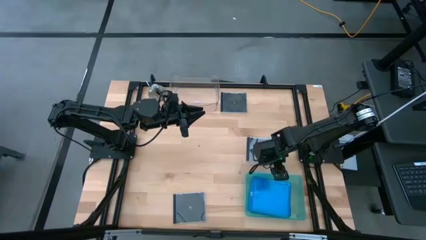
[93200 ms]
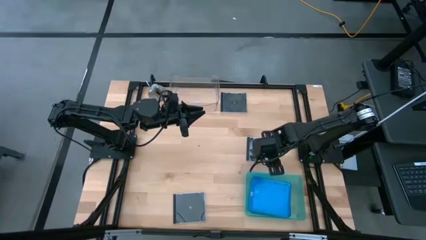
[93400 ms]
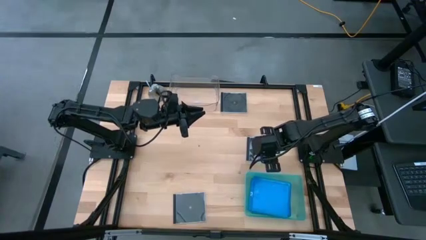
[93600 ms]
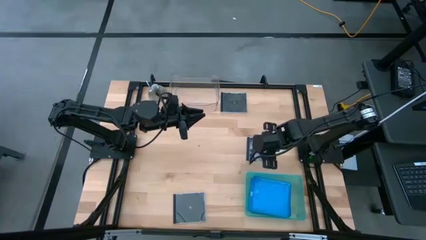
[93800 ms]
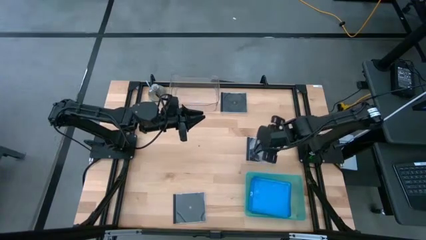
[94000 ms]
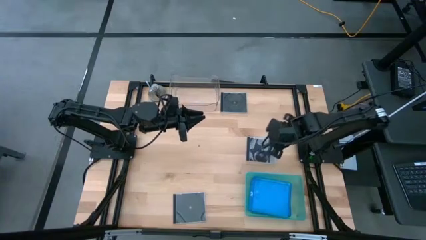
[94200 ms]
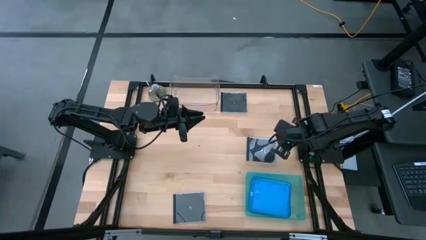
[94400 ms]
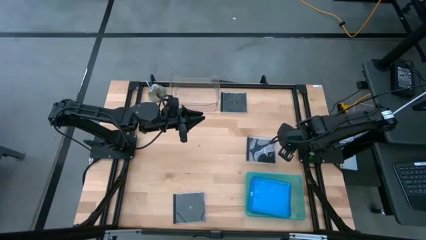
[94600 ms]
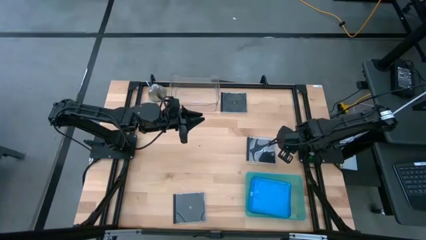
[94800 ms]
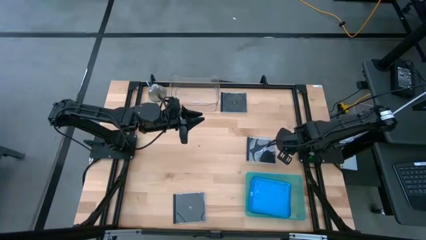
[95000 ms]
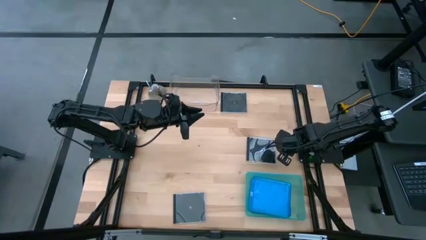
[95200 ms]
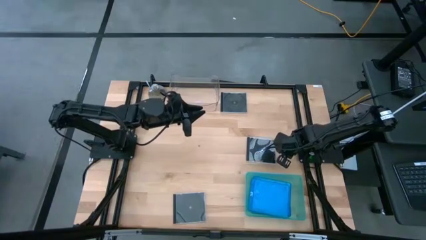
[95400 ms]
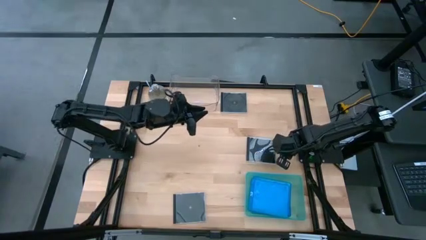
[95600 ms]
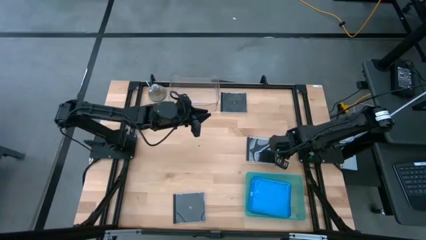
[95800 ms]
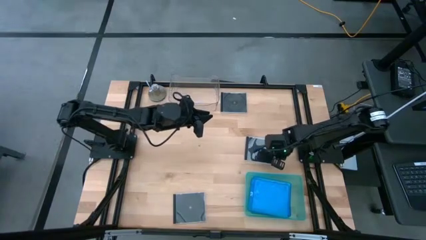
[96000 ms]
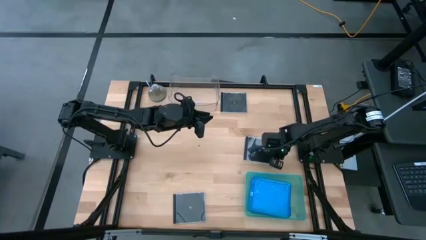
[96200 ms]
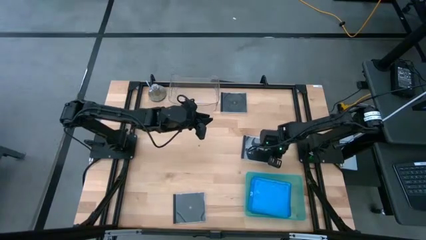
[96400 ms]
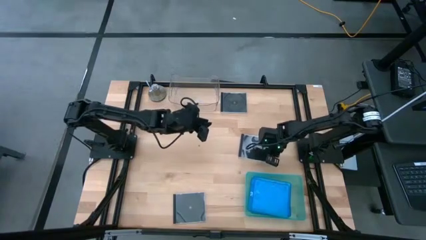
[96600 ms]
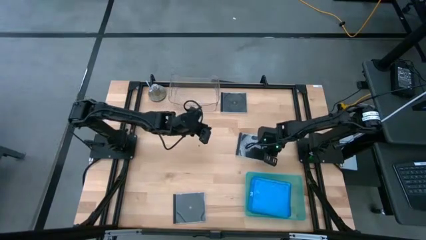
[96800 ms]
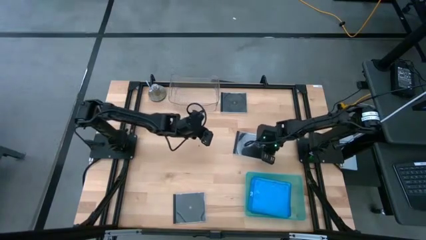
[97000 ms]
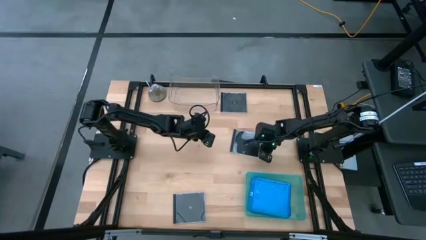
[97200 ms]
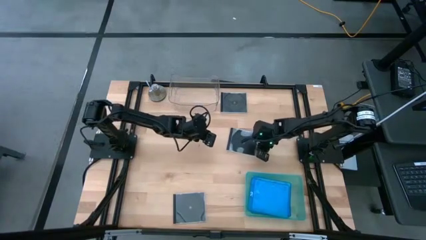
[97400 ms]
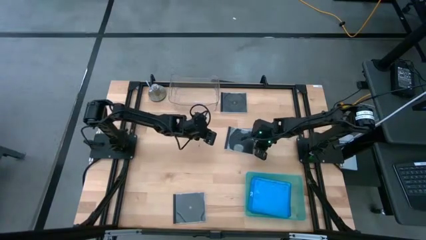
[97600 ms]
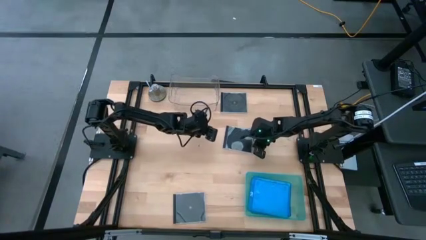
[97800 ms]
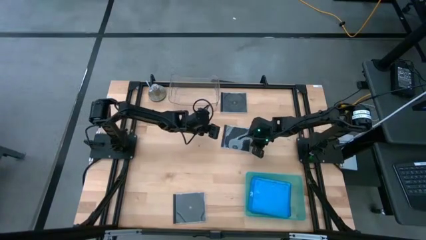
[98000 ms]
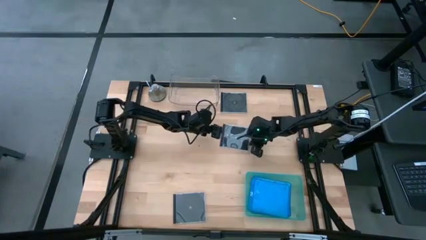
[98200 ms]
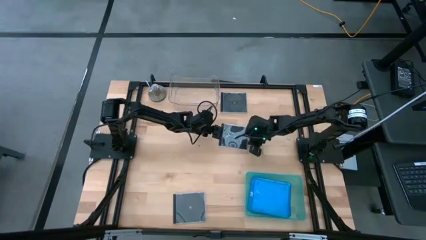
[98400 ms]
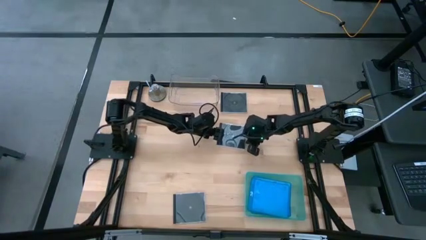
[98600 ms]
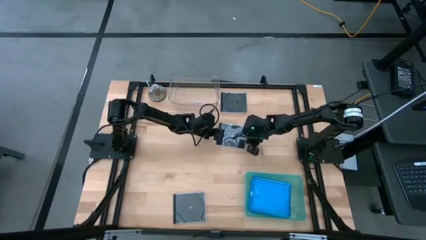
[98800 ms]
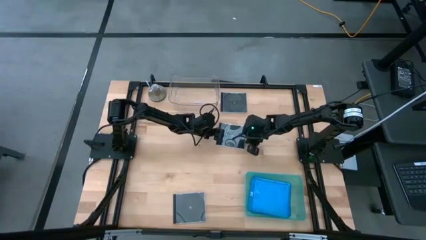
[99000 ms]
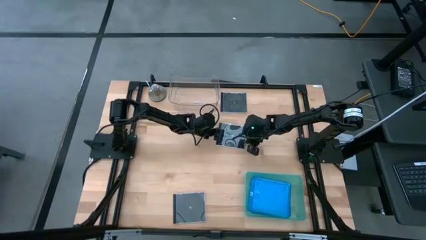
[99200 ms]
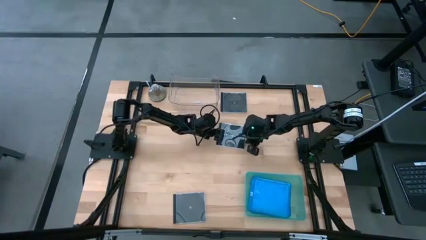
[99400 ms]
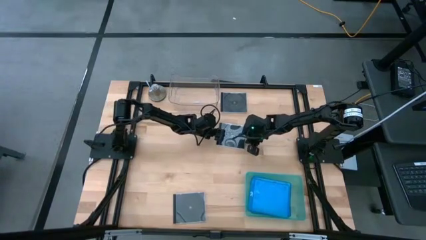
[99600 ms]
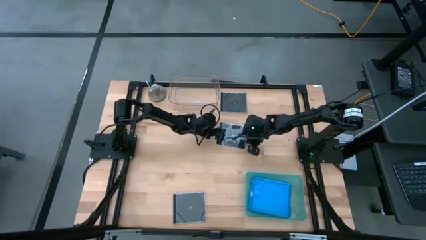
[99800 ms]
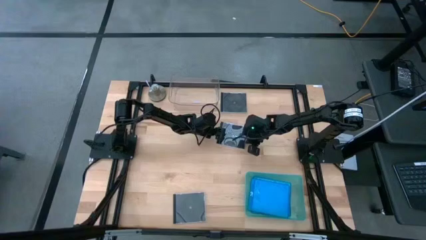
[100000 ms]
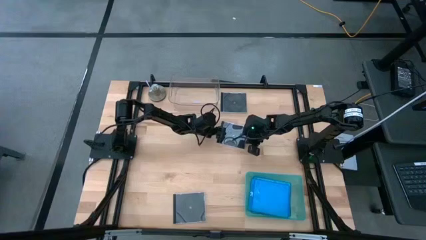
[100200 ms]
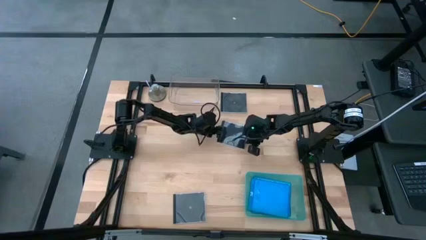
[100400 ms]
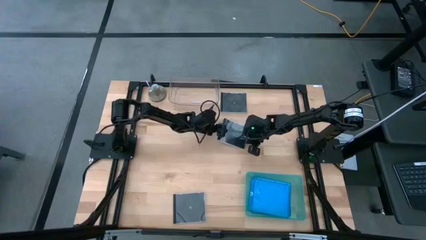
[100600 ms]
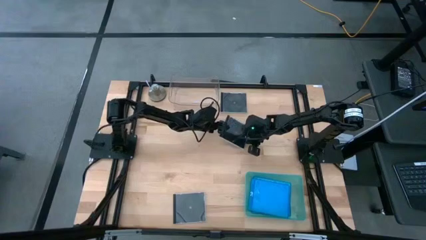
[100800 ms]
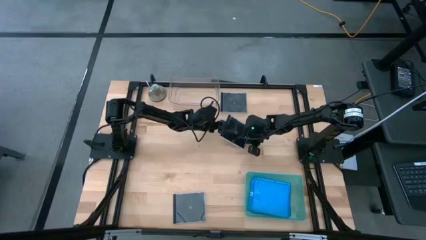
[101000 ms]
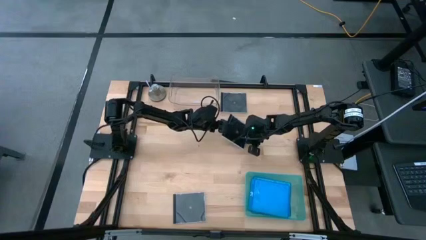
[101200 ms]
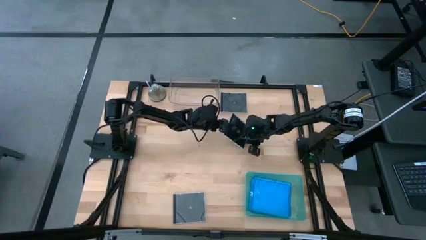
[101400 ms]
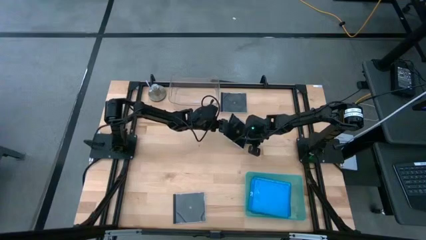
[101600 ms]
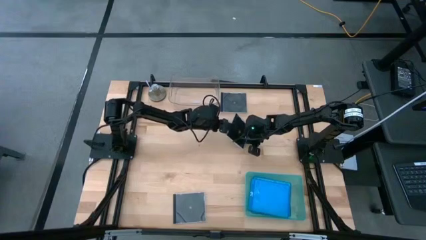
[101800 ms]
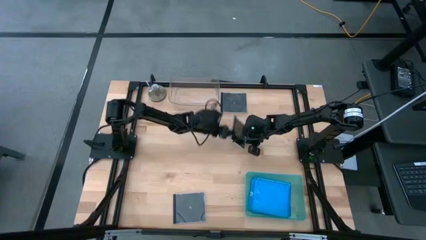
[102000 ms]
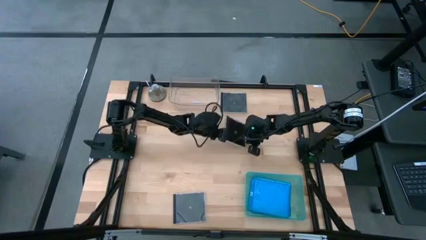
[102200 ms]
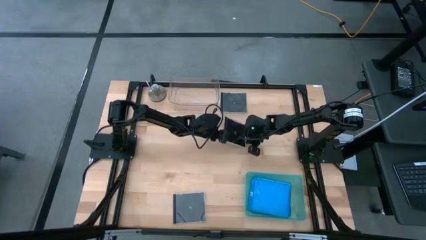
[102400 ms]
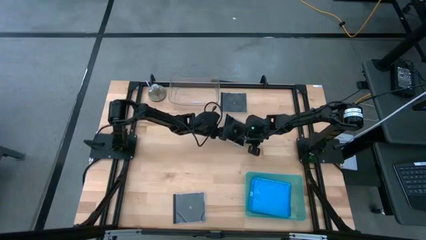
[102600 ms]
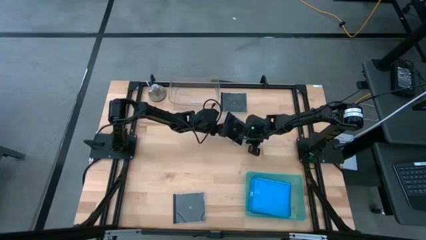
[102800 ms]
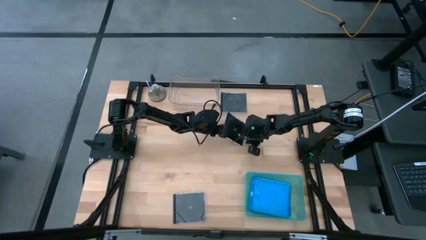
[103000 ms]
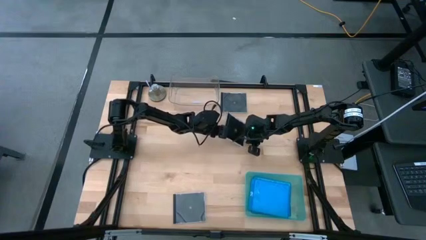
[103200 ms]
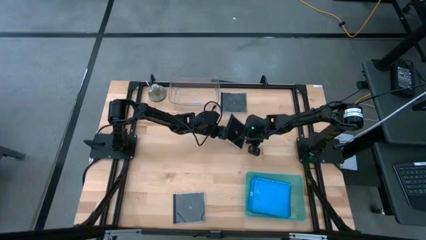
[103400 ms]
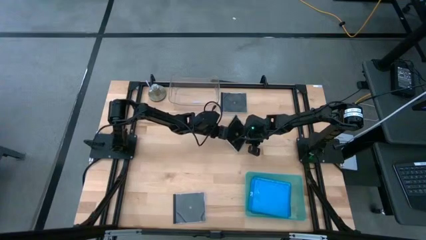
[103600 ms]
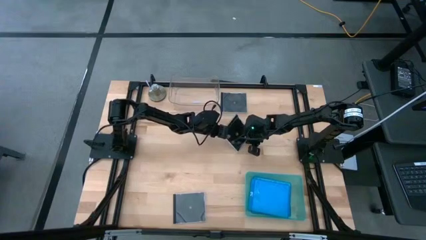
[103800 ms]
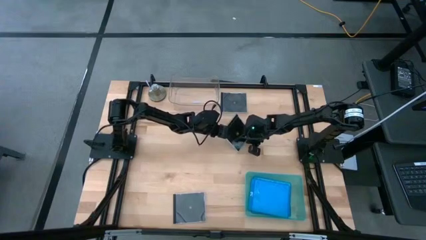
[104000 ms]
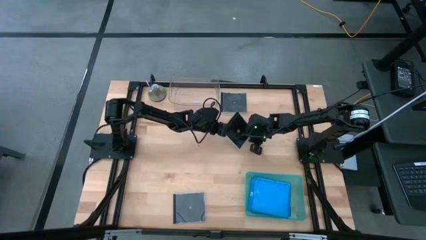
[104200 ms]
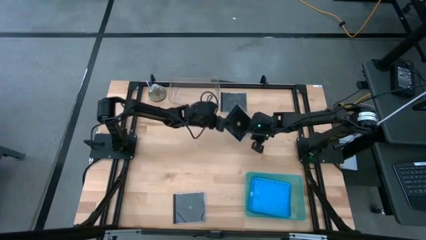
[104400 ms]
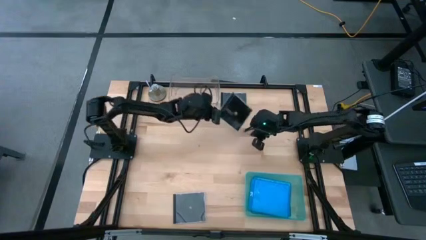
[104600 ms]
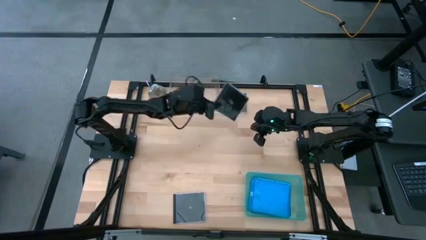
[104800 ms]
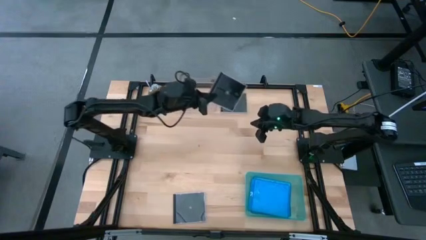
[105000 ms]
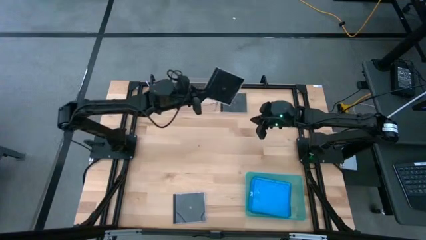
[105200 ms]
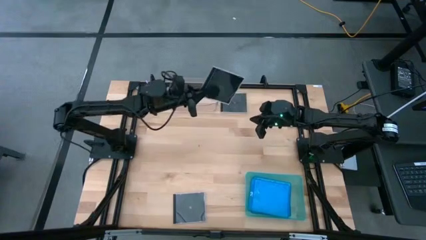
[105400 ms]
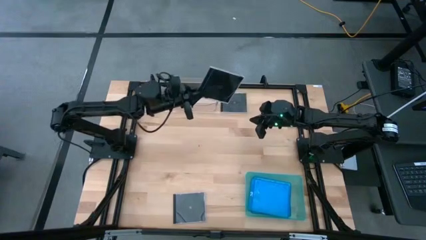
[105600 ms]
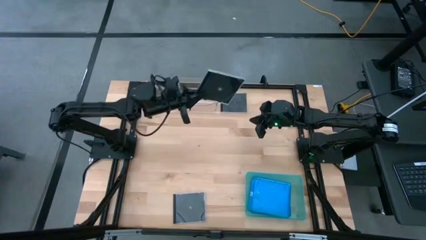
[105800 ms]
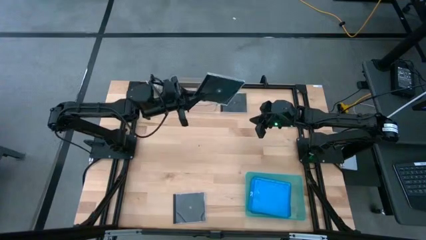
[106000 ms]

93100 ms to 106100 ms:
Task: Pick & place jewel cases by type
Put the middle black cd case into the transparent bin

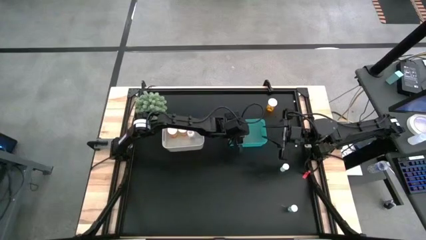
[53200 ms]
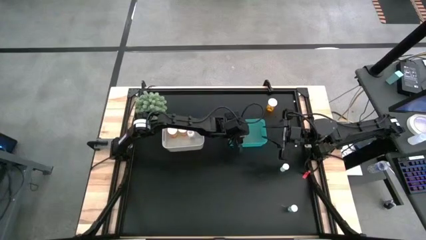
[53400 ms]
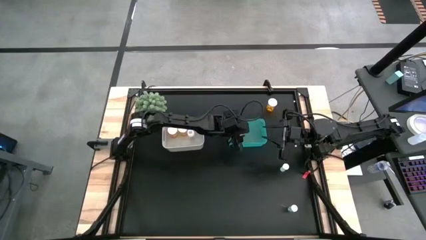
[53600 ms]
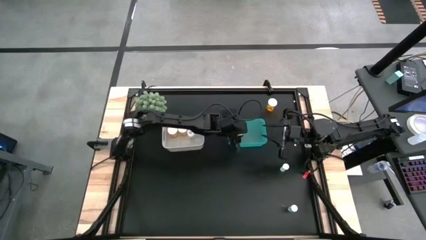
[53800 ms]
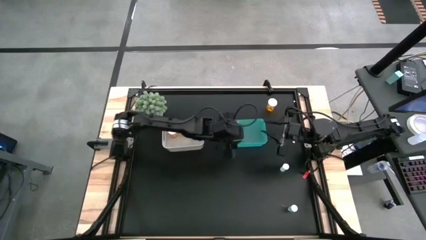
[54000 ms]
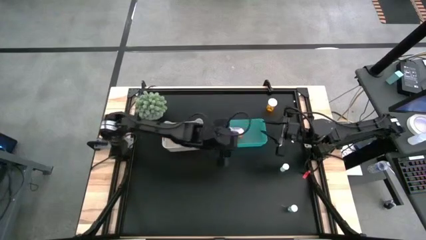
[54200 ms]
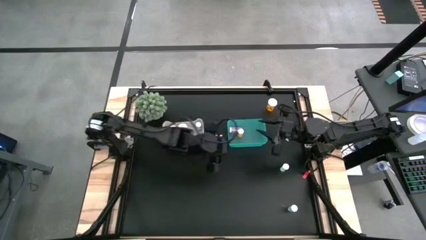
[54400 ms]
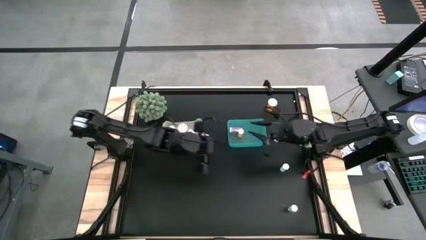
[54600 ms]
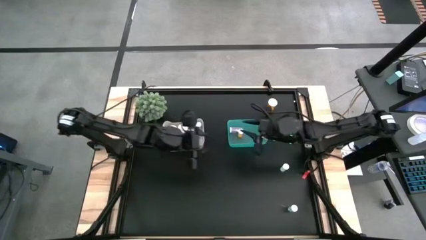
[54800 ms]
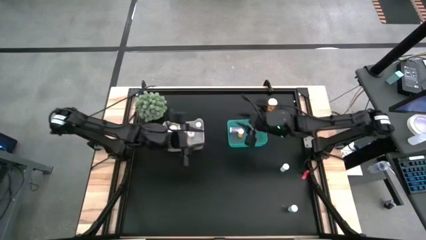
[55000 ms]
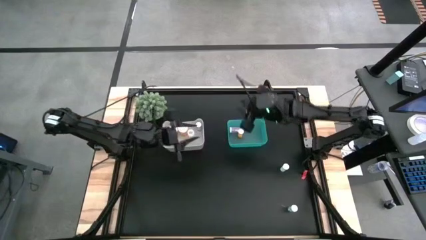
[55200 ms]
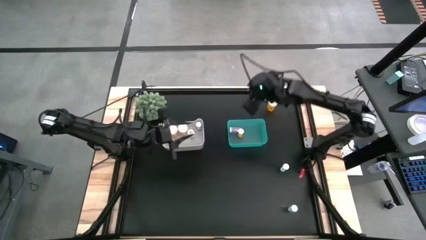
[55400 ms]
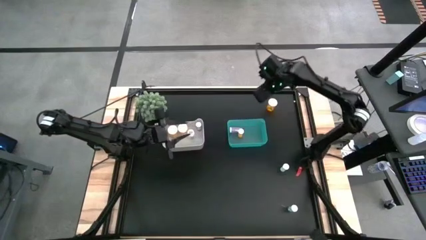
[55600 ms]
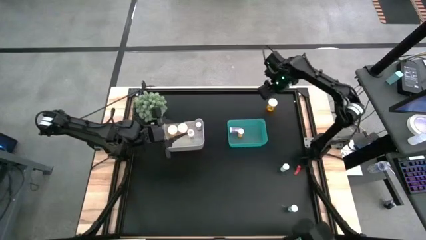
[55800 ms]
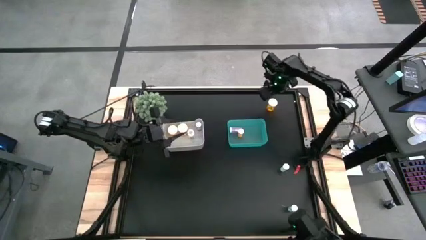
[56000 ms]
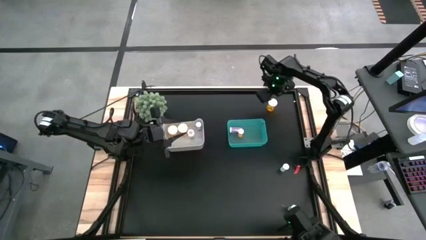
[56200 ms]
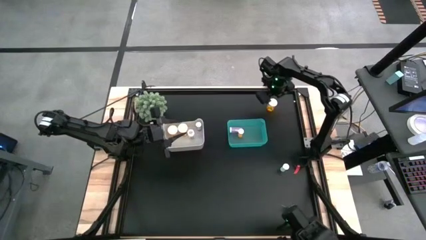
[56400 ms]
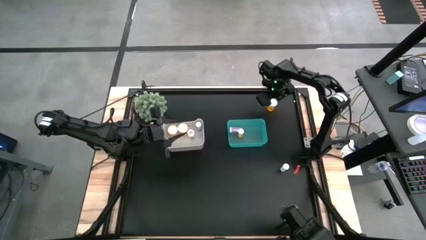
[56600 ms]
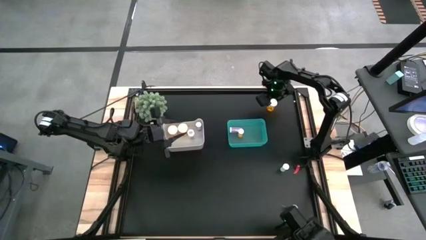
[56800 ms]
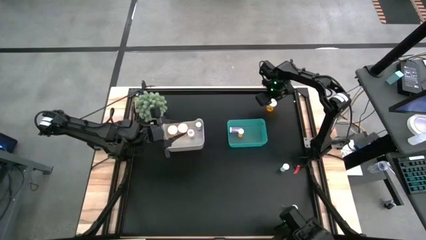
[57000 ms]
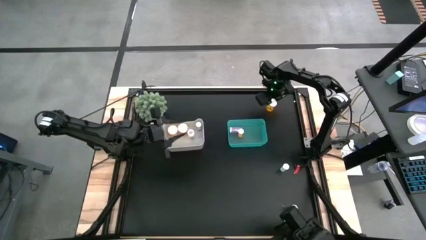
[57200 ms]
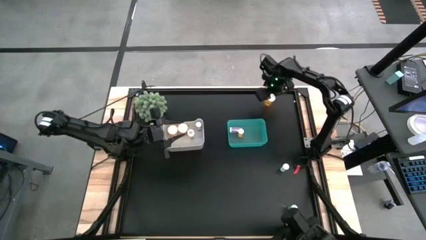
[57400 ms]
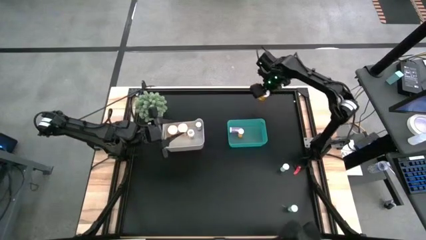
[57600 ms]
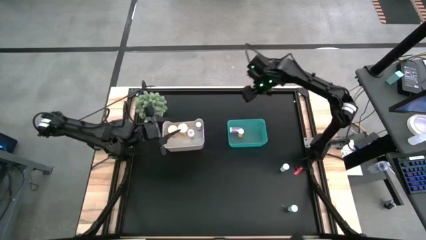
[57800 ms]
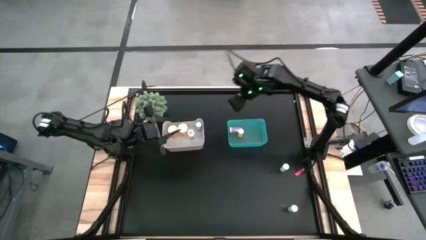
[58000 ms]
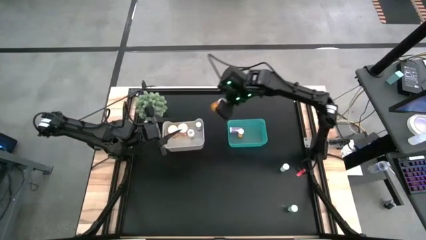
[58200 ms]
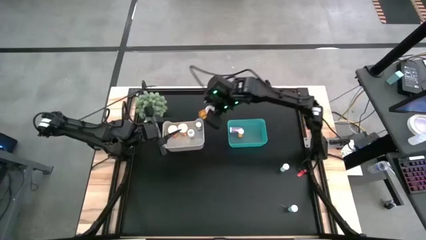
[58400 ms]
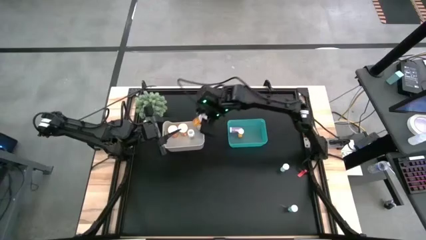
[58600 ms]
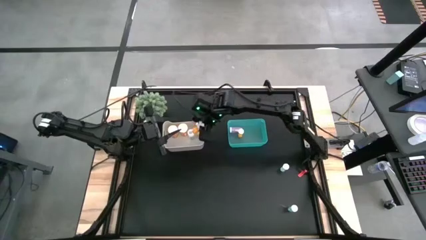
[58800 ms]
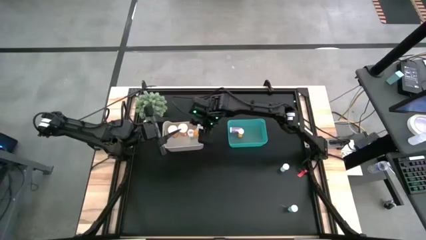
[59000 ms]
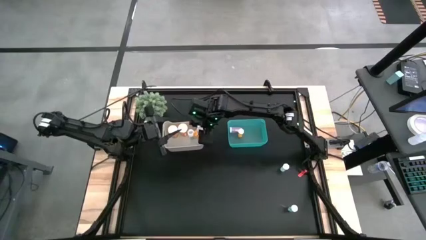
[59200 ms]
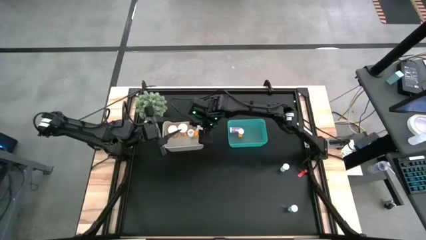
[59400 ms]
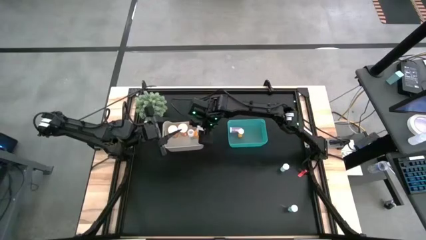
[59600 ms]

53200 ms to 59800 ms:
Task: Pick and place medicine bottles into bin by pill shape (circle, oval)
Put the large orange capsule bottle into the white bin
